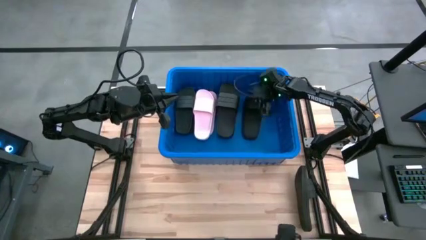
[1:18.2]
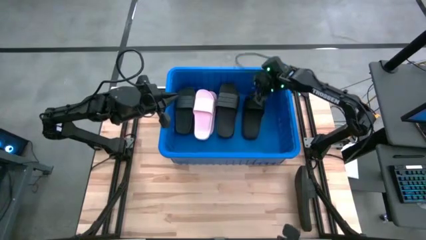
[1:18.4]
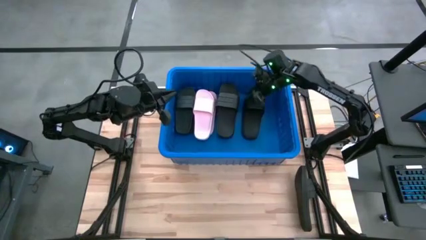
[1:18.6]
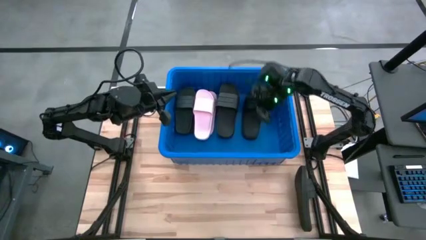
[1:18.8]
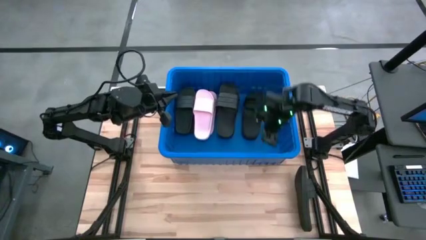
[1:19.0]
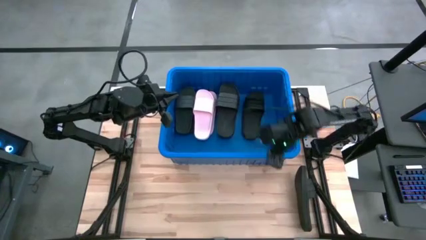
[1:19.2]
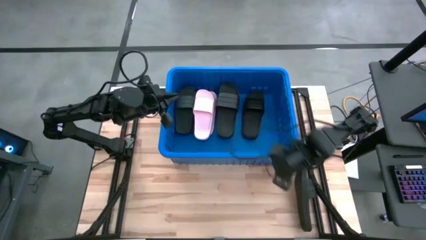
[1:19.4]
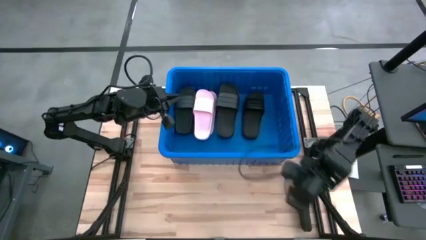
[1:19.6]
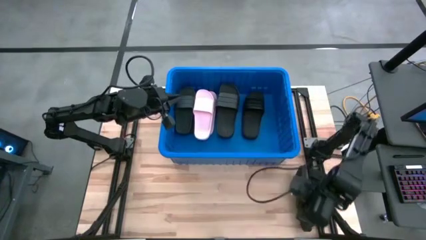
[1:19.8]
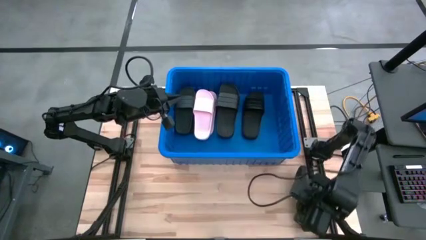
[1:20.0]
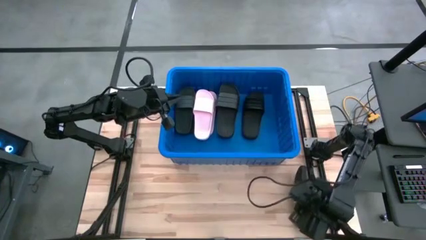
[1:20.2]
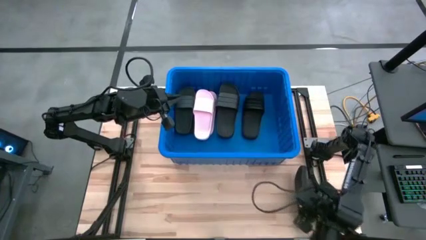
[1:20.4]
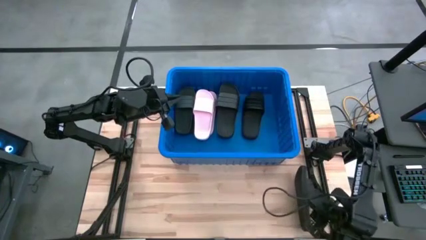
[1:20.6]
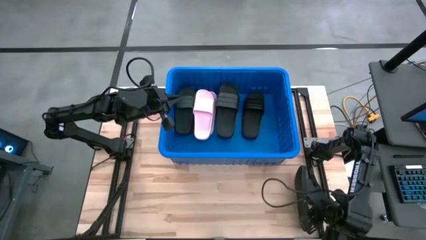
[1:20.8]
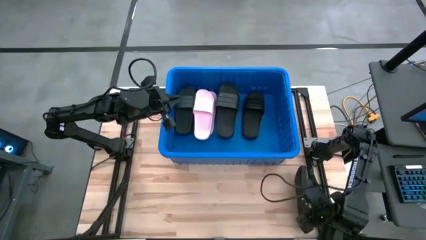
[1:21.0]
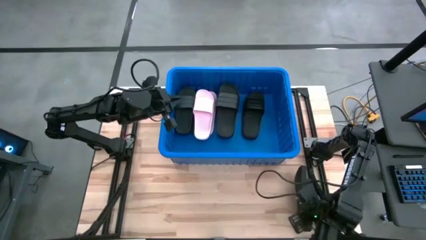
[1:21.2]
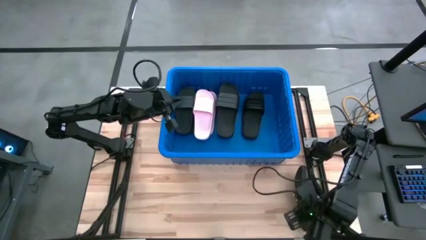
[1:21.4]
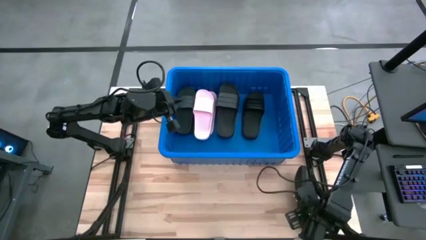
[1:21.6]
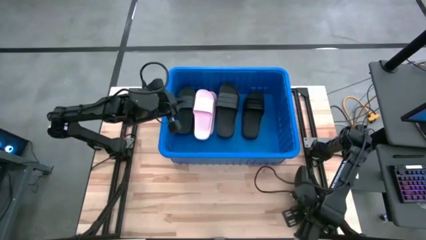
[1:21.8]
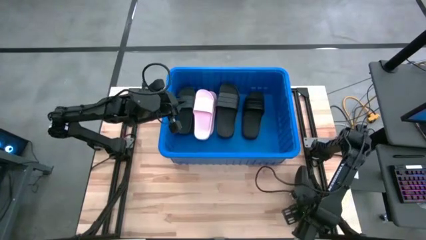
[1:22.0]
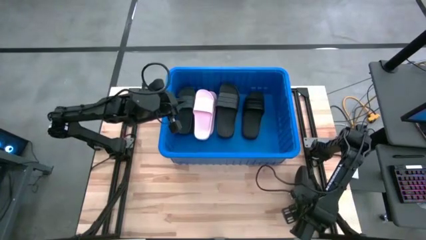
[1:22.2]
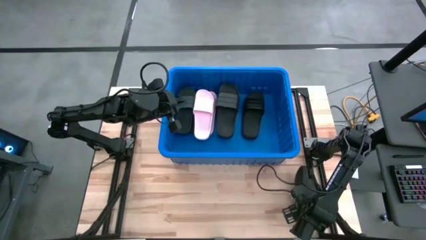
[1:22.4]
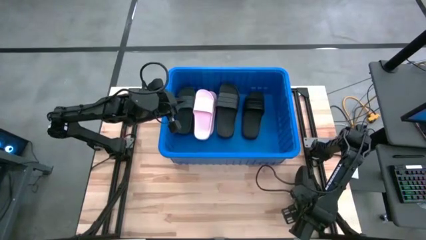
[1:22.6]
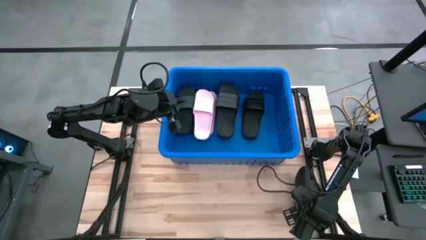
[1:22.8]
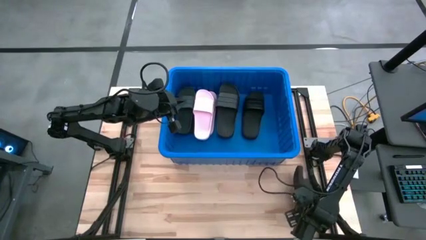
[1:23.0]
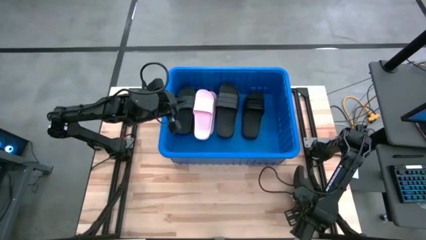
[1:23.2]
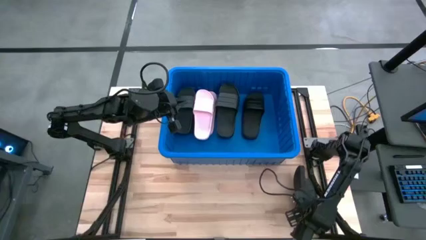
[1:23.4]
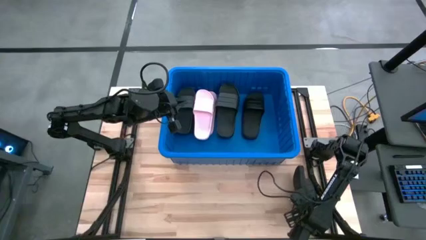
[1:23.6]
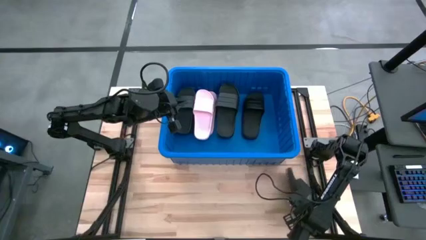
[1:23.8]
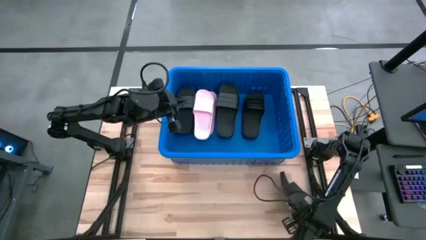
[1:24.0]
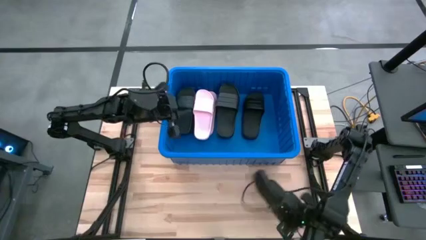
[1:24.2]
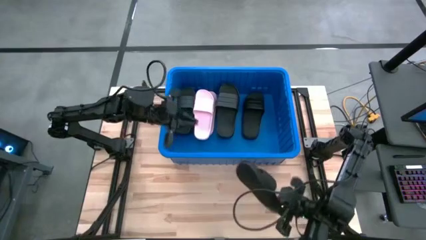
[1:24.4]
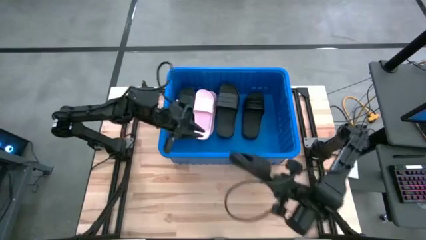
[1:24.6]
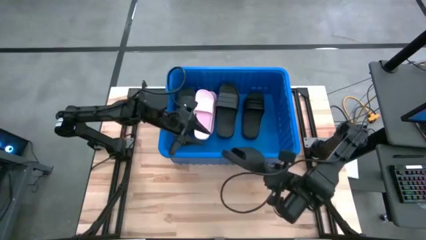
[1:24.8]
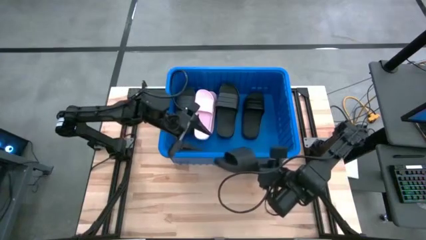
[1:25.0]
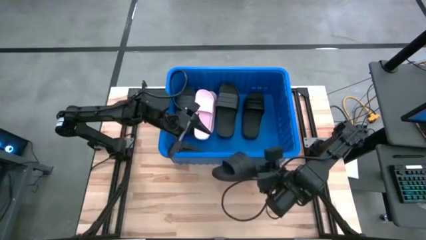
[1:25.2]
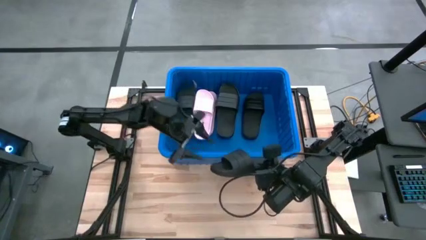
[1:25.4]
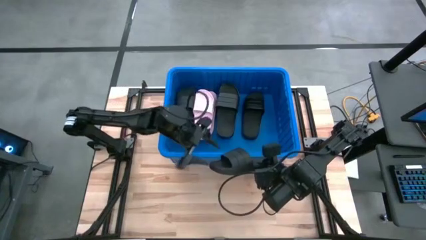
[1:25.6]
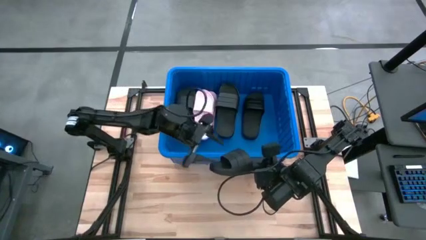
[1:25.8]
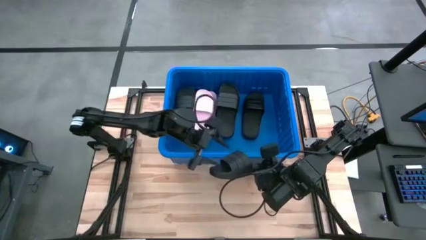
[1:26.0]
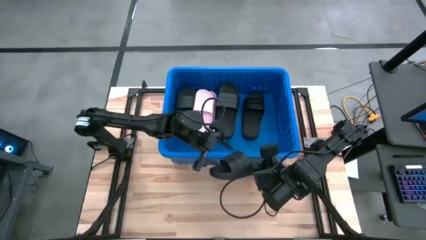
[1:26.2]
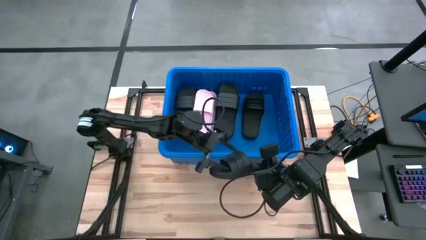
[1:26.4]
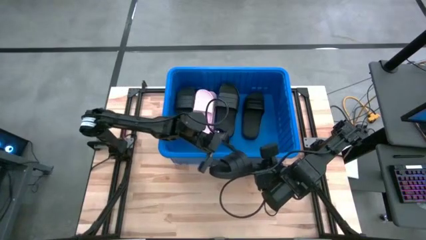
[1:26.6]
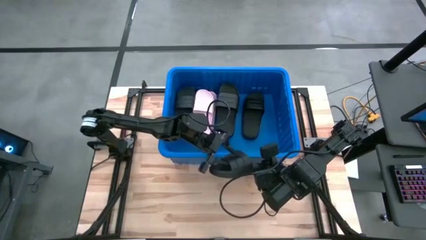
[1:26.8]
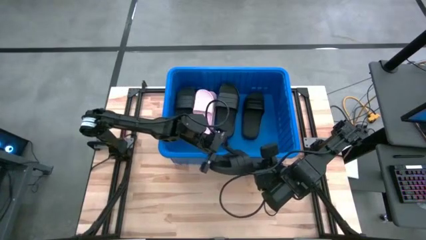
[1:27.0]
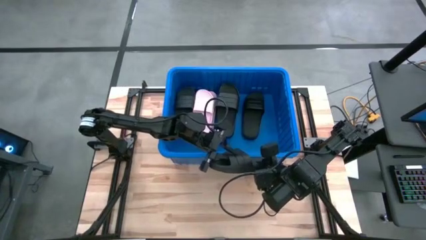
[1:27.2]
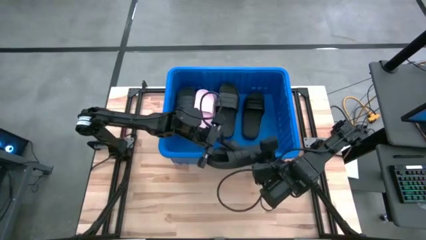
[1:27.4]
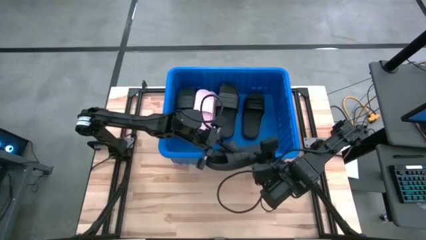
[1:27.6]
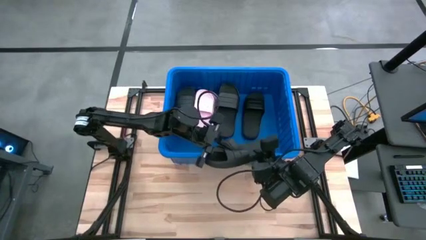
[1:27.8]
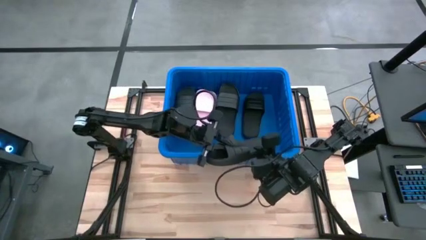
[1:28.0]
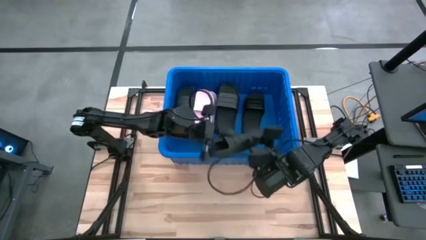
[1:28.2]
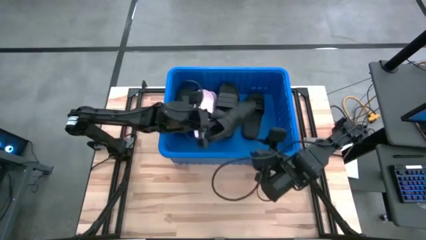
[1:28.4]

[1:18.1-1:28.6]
Task: Pick and place slides into bin
Put the black slide into the blue container
